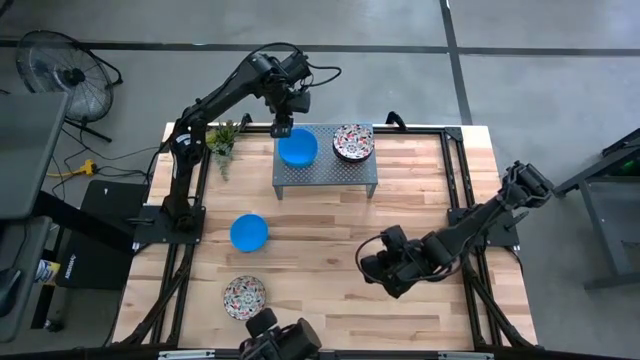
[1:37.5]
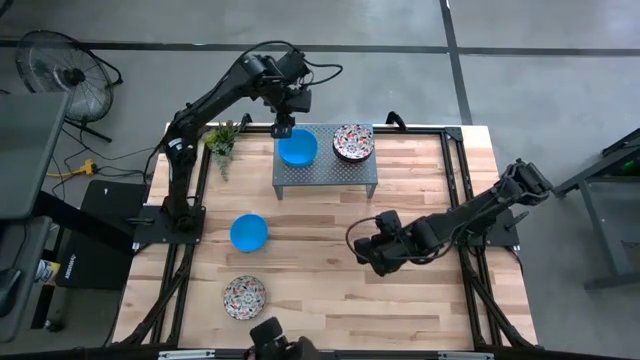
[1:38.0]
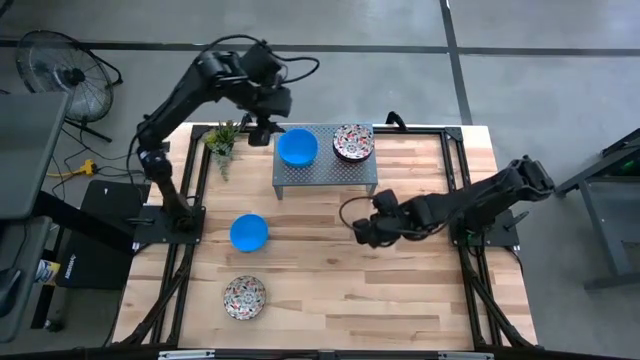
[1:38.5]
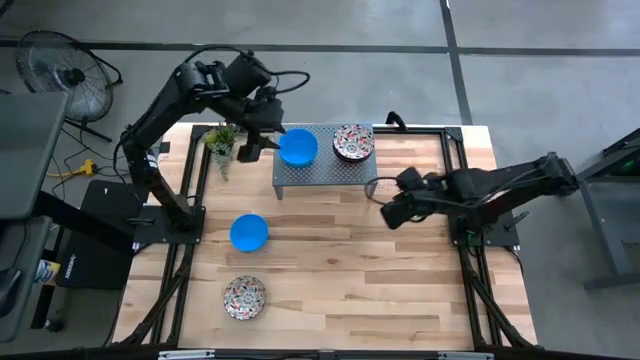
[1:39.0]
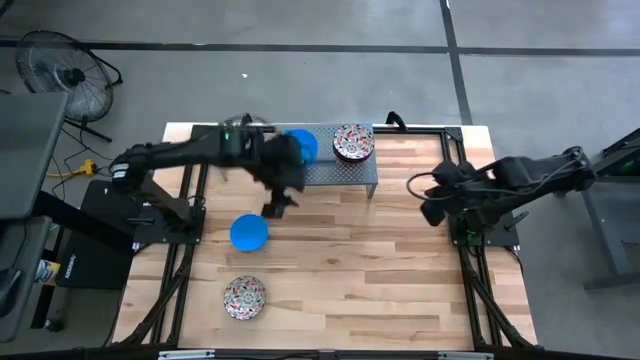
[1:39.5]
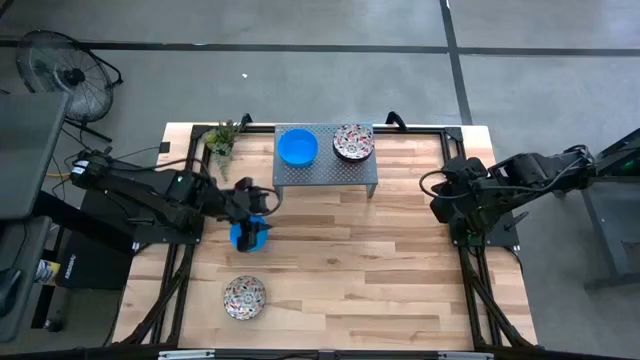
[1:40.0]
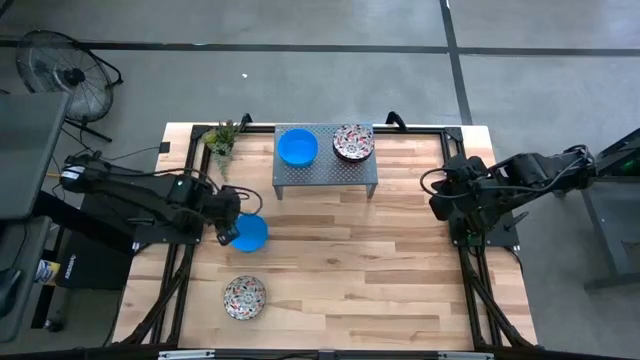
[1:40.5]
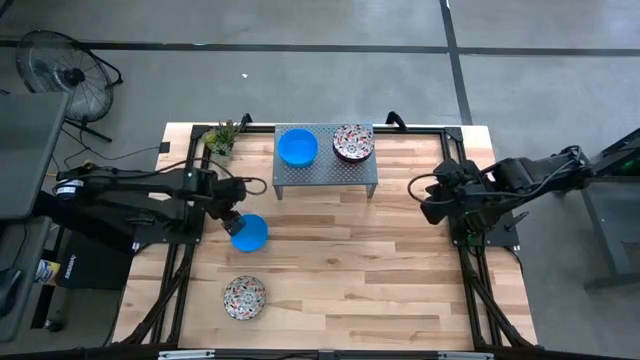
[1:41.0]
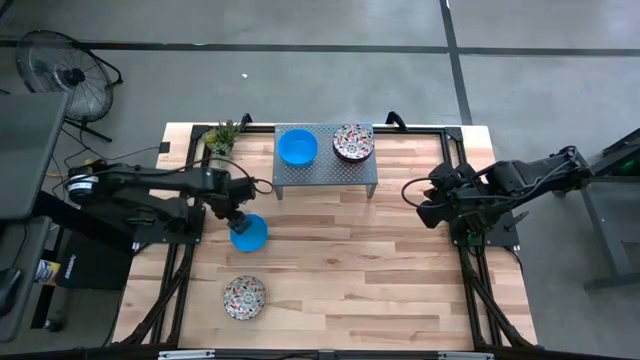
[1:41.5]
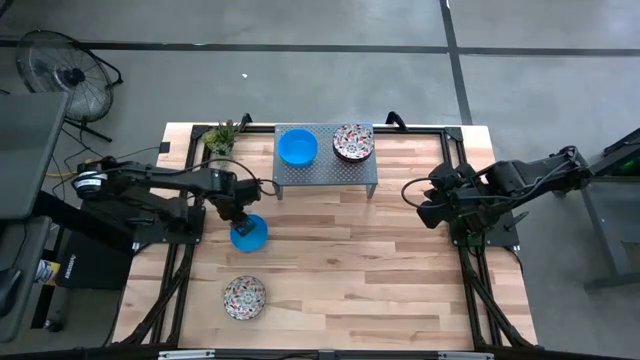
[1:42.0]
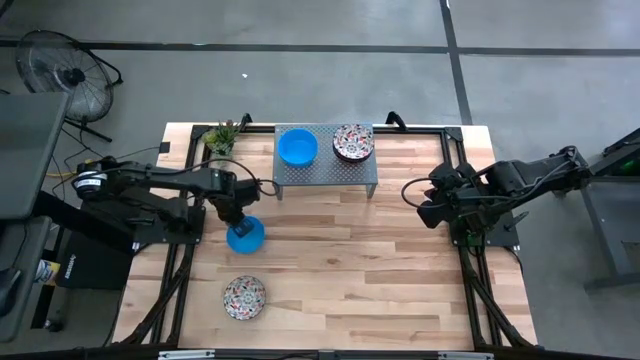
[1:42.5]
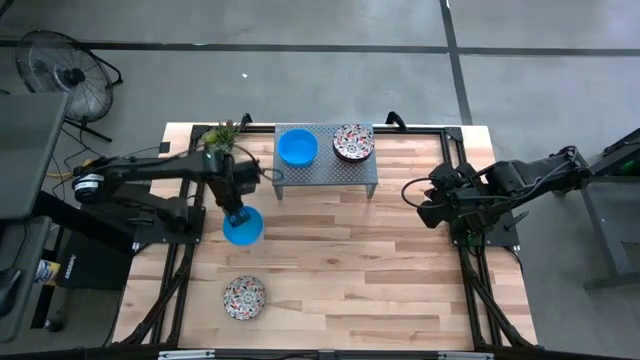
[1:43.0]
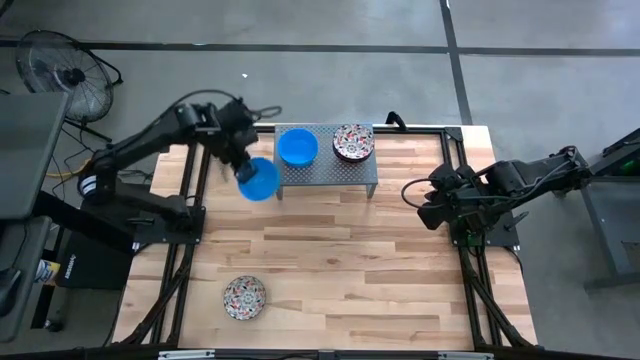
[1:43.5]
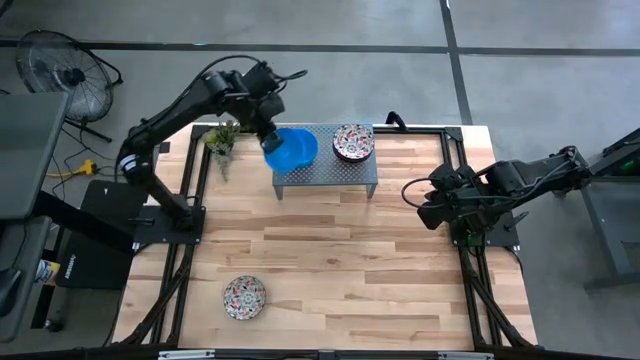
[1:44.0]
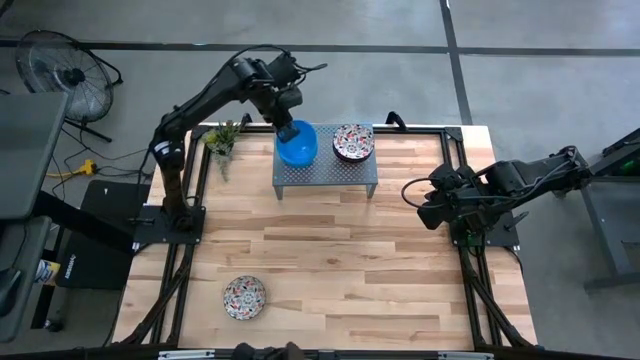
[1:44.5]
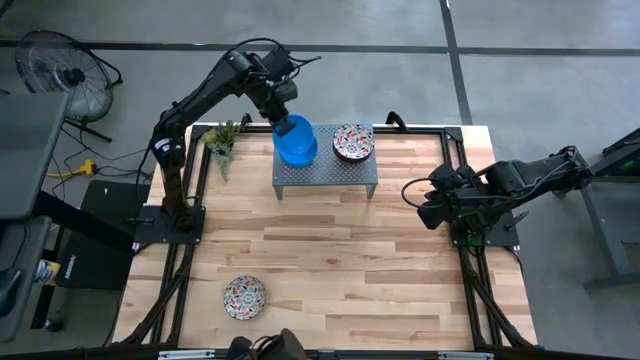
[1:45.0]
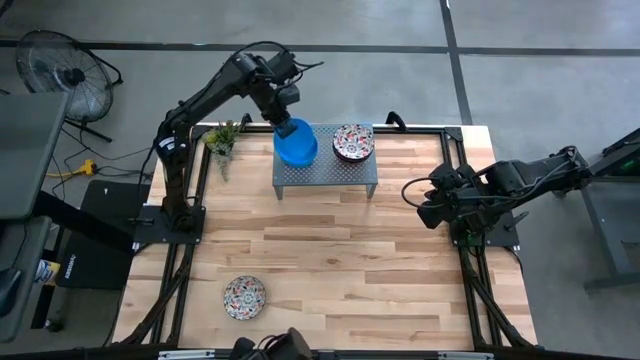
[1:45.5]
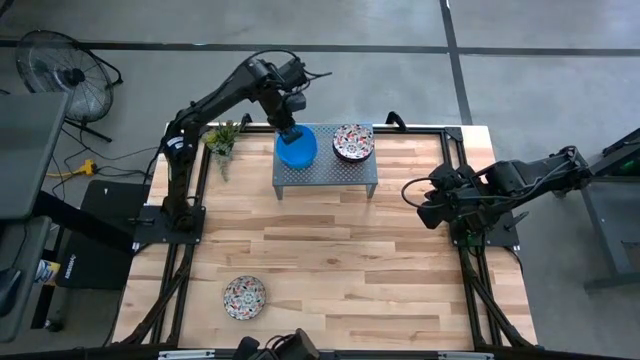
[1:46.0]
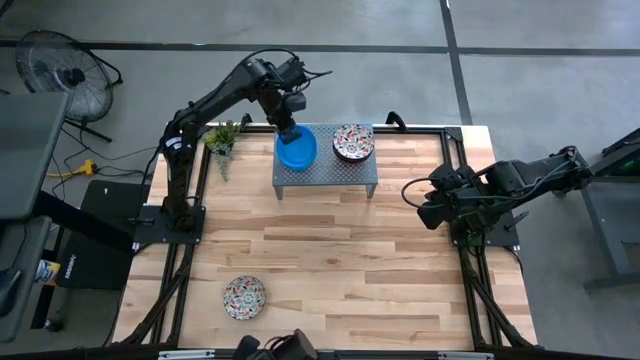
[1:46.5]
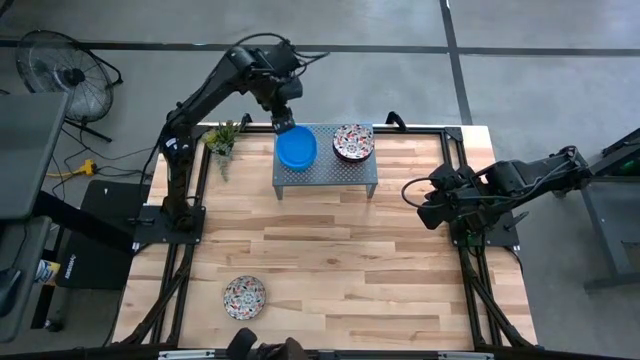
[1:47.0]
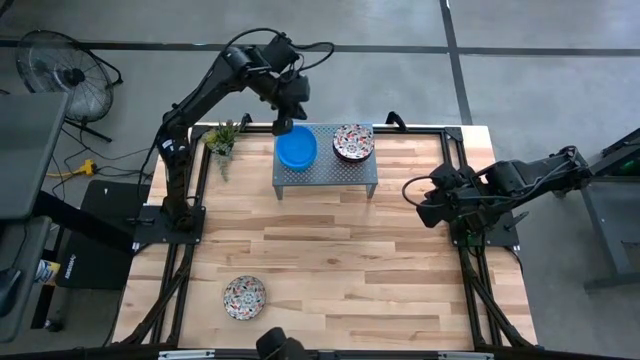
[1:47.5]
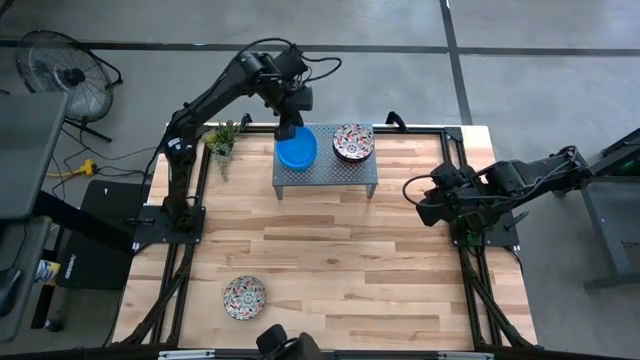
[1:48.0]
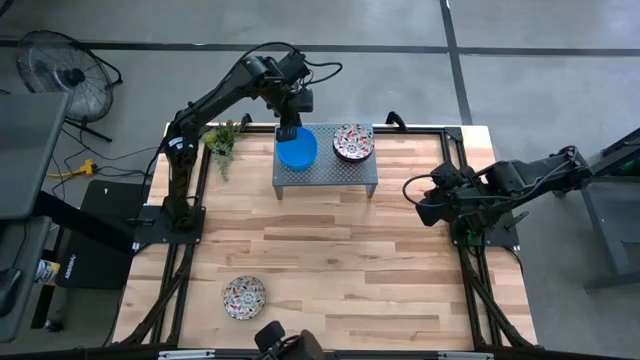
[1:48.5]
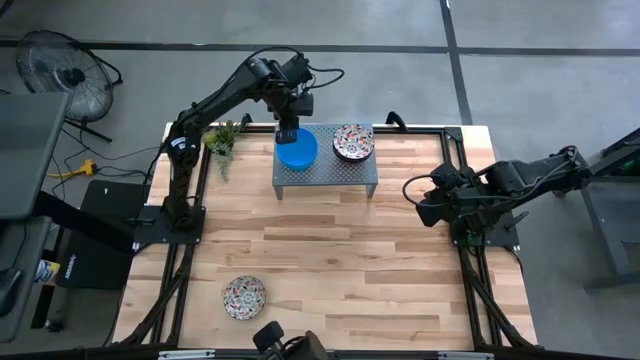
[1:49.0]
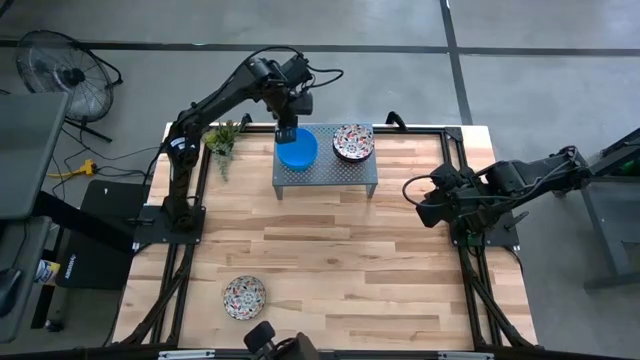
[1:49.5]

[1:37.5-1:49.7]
Task: Pick & Place Mini bowls
Stack the blue bowl on top of the other blue bowls on the shelf

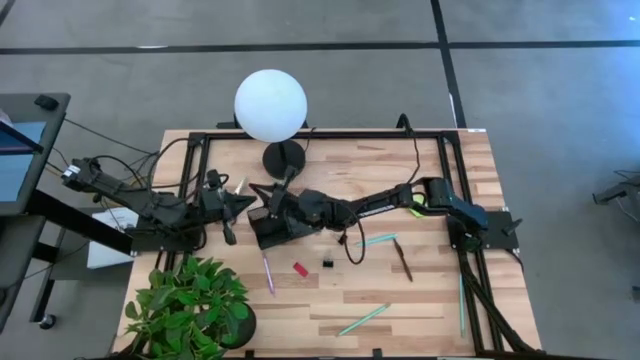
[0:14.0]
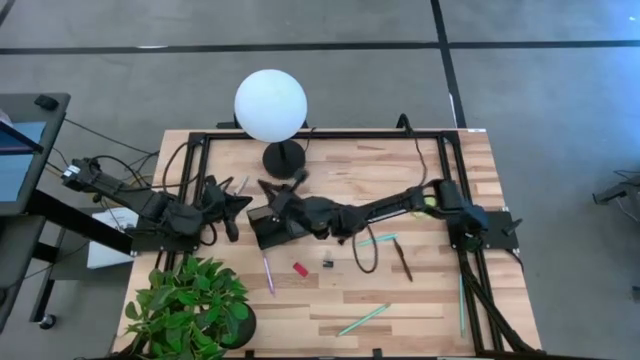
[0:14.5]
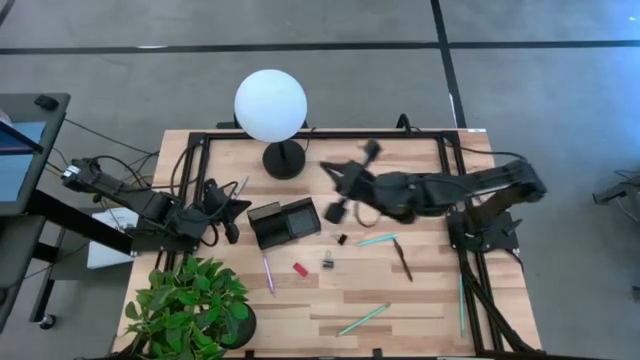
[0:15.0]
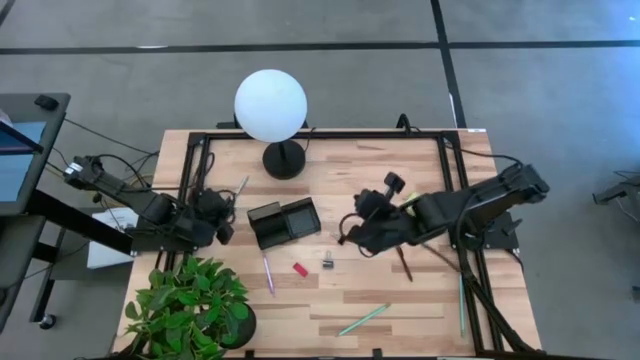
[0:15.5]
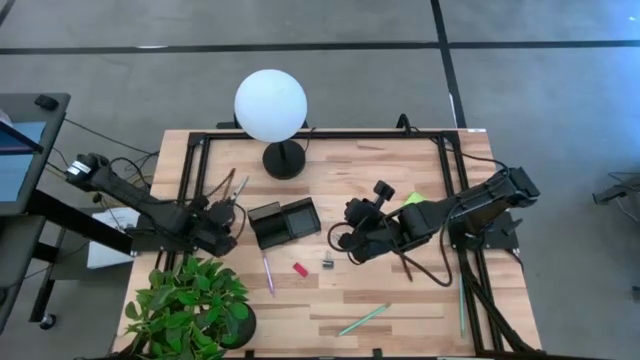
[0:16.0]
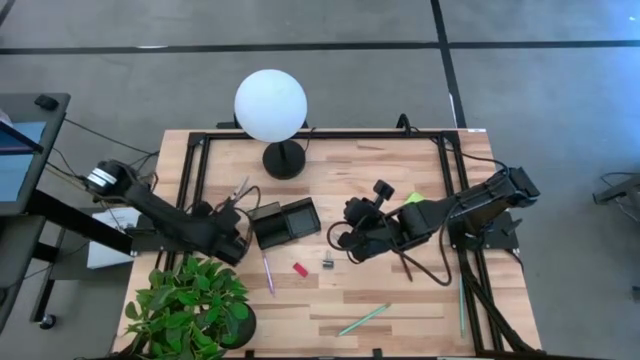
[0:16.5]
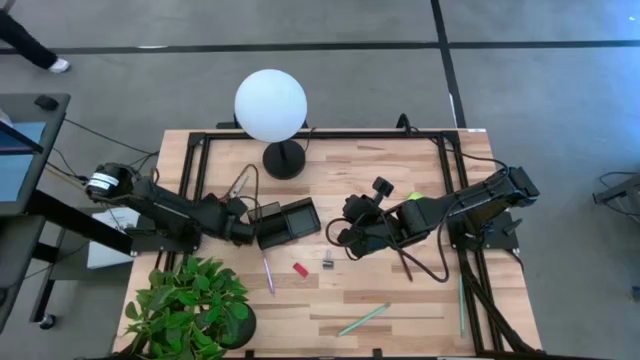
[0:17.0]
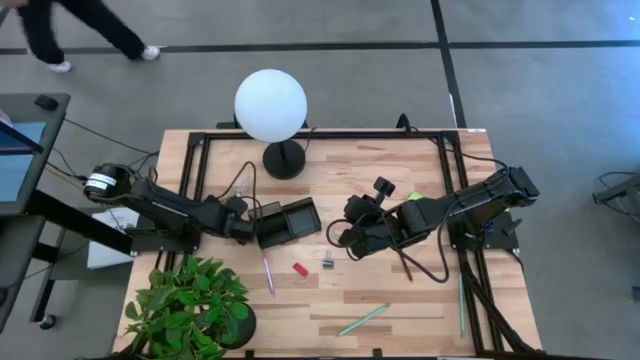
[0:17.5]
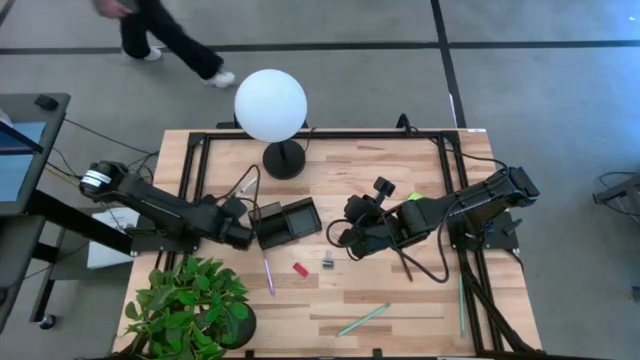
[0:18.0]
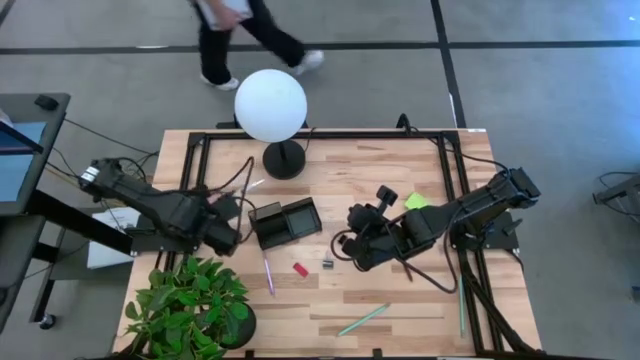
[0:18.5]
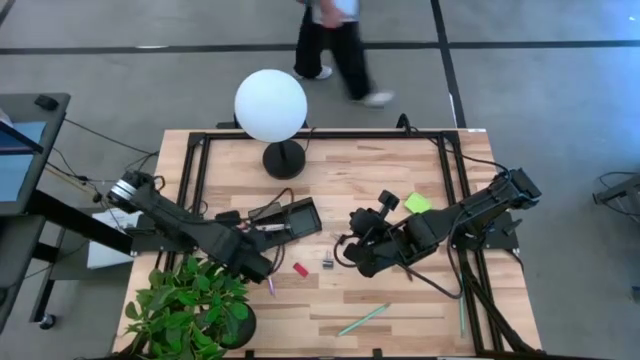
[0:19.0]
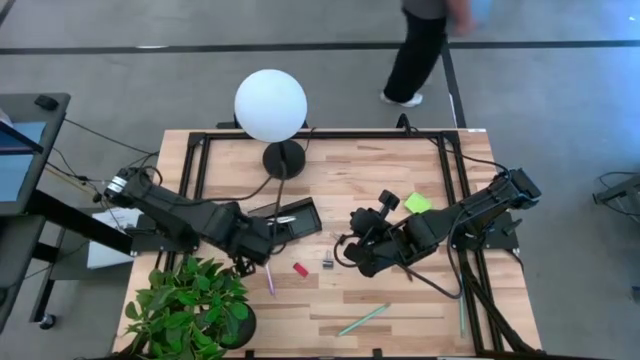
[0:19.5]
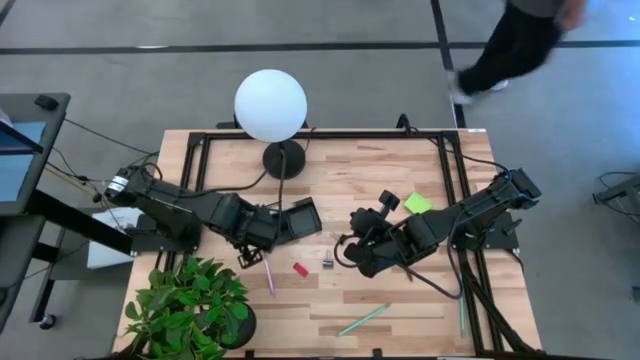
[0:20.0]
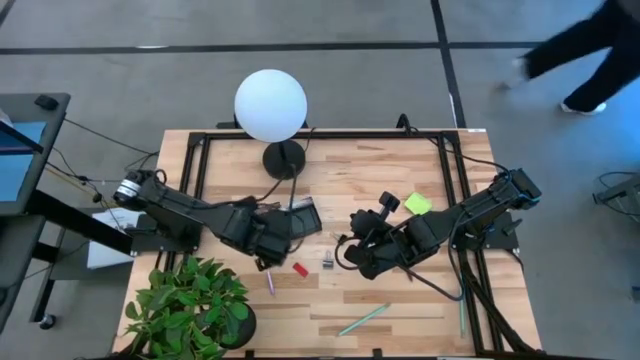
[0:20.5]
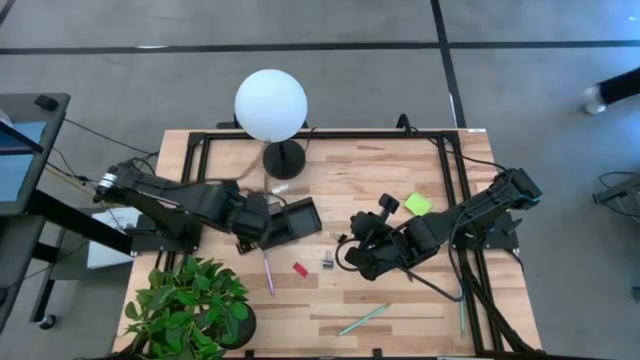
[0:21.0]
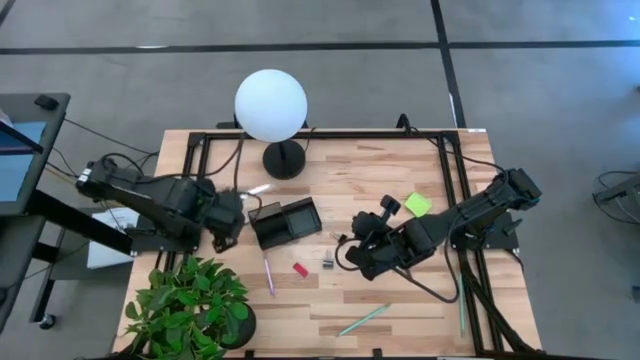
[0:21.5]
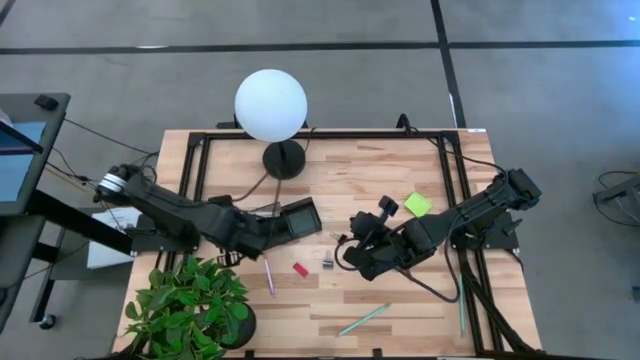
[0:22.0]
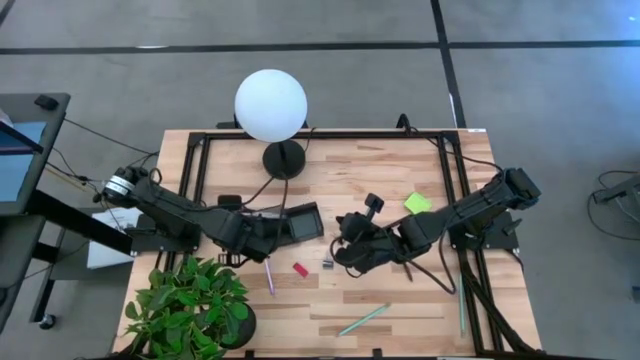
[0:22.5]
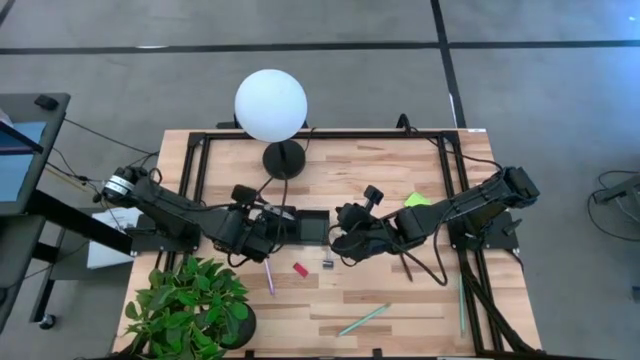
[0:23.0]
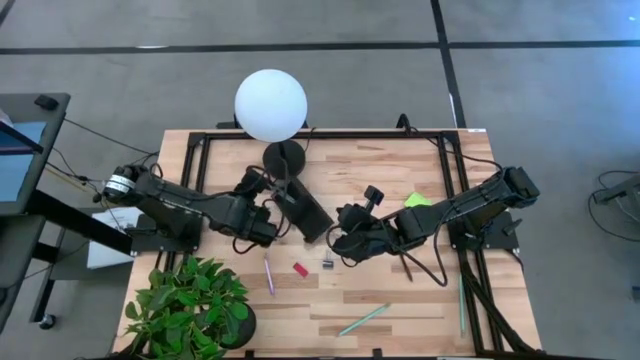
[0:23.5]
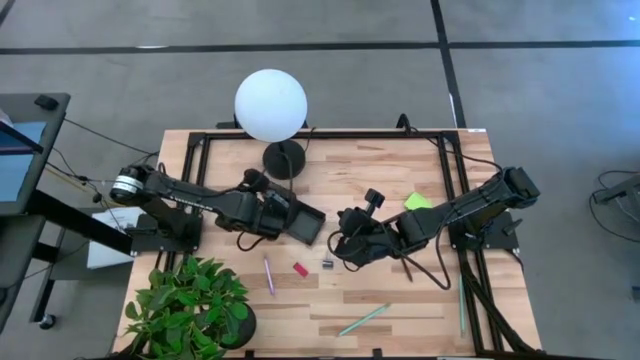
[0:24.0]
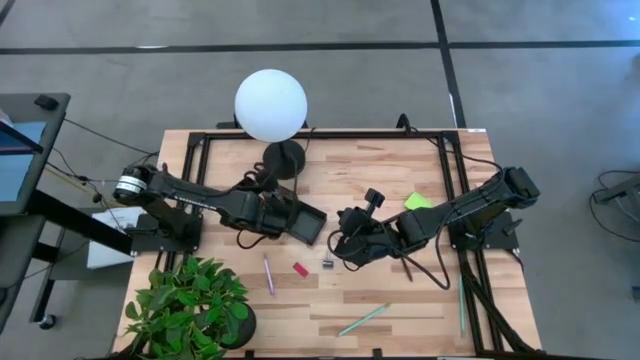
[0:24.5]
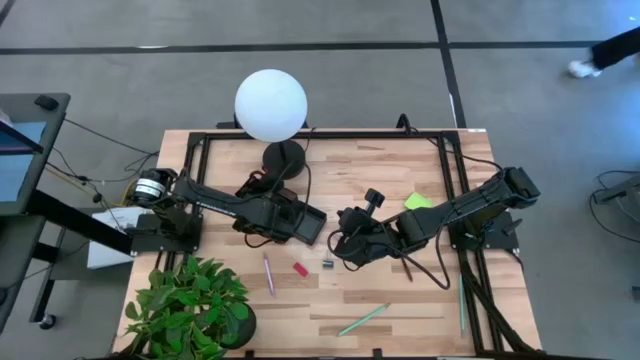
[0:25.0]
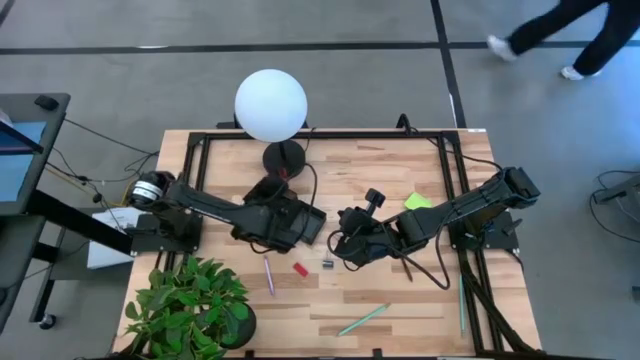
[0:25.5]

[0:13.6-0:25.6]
Task: Pick and place office supplies into organizer
Put the black scissors into the black desk organizer
